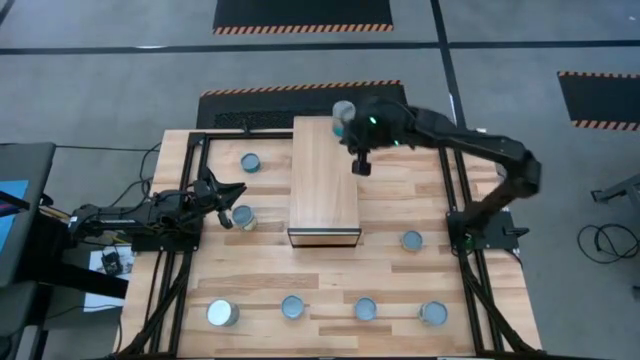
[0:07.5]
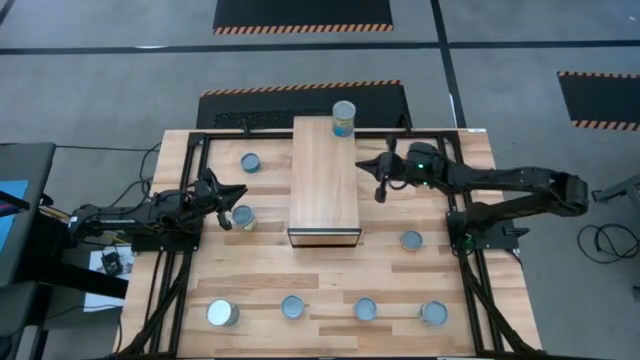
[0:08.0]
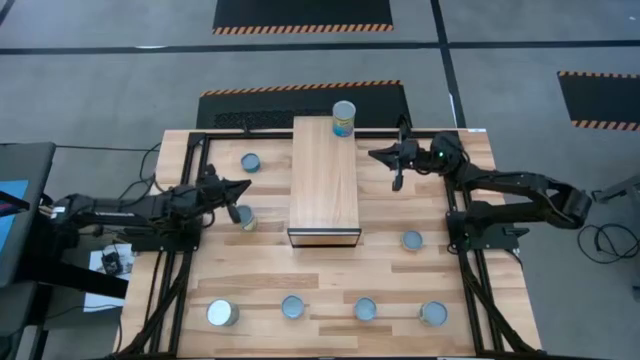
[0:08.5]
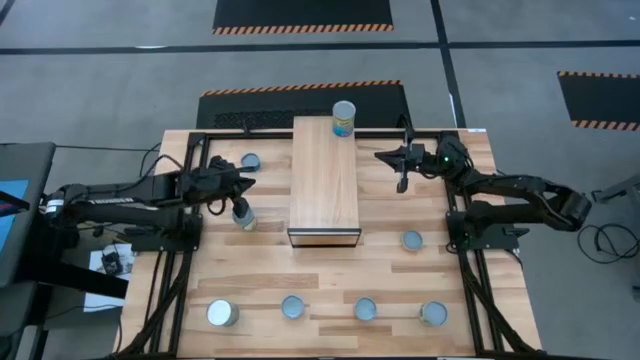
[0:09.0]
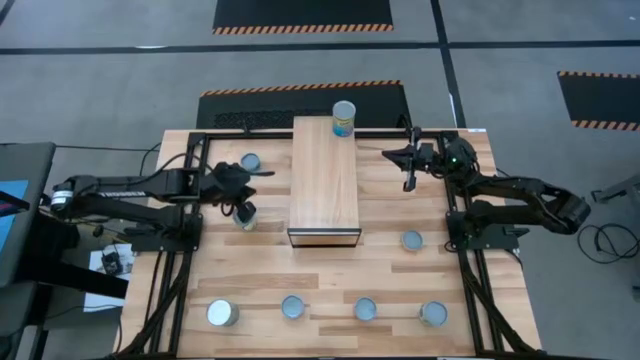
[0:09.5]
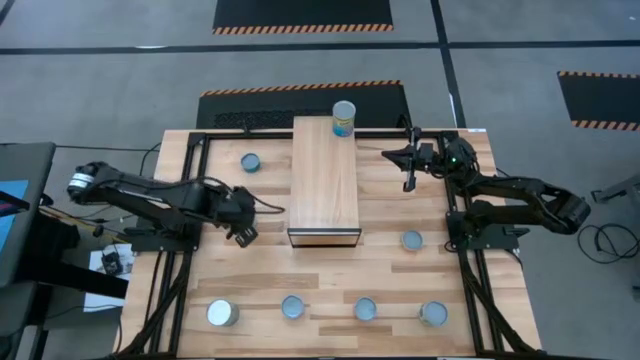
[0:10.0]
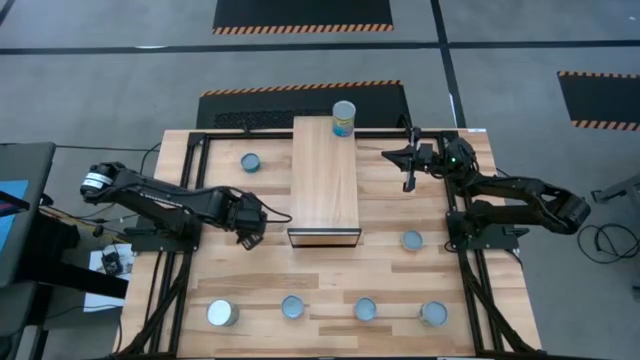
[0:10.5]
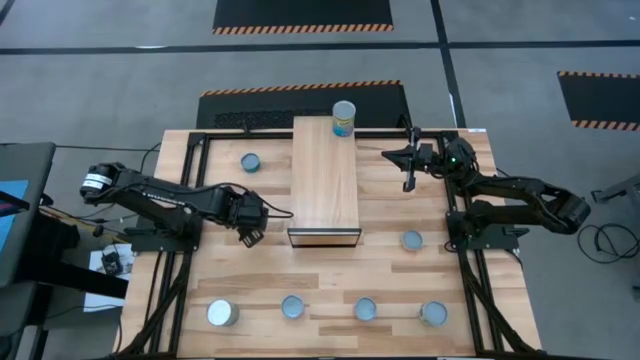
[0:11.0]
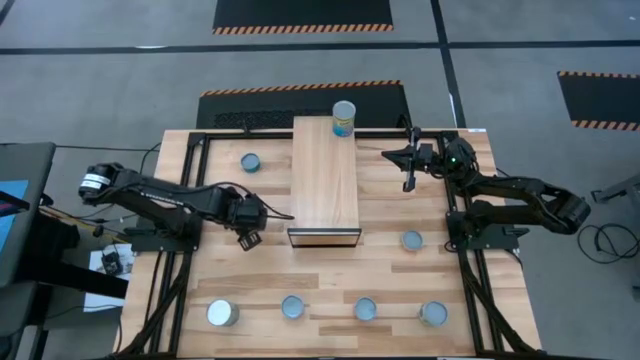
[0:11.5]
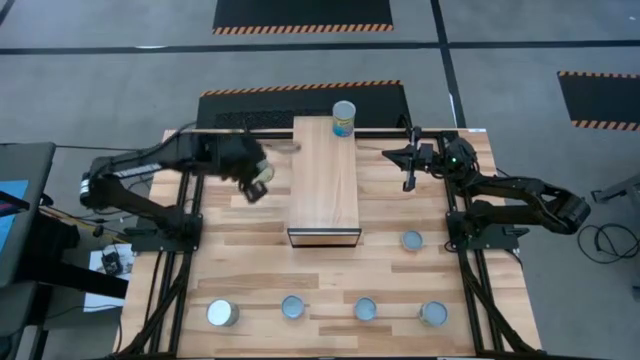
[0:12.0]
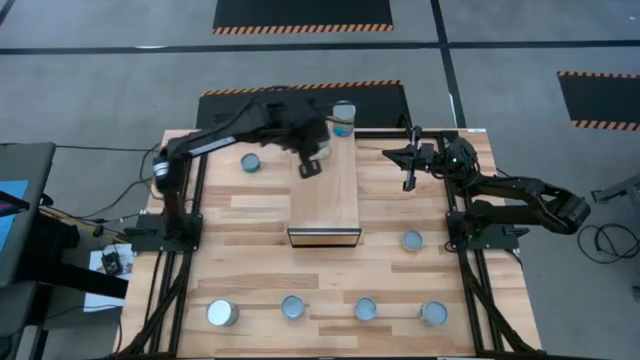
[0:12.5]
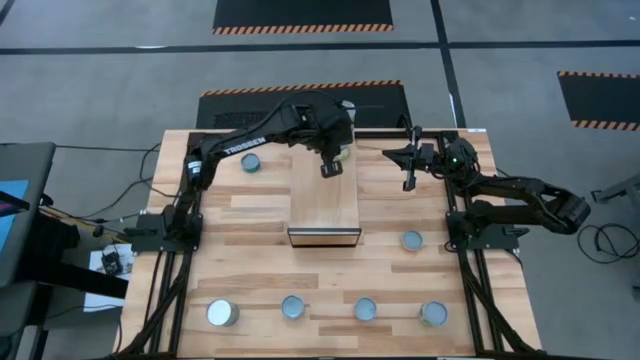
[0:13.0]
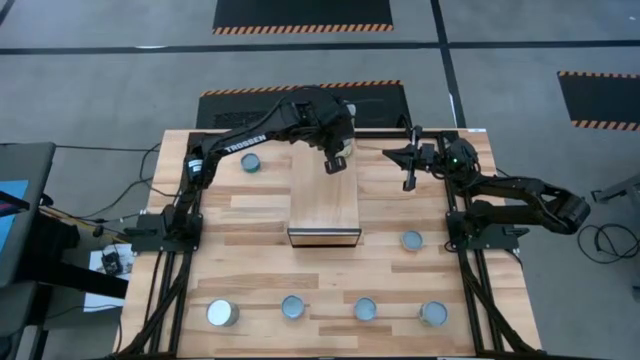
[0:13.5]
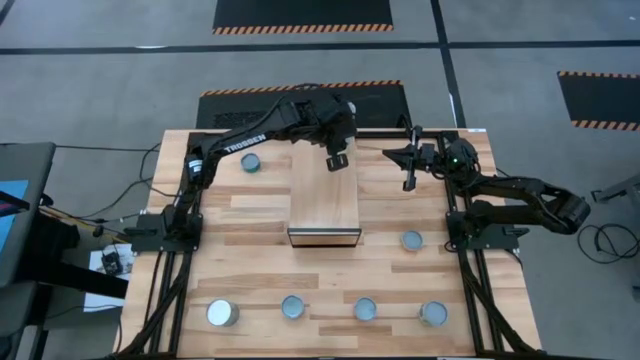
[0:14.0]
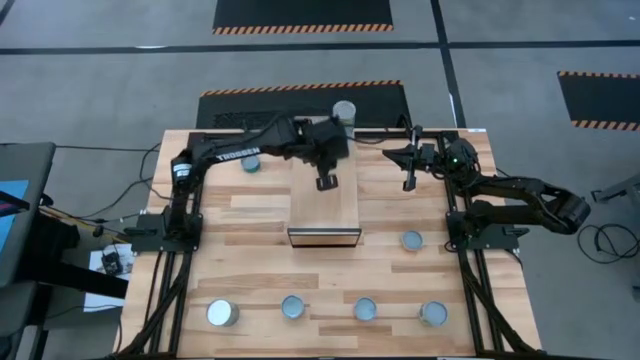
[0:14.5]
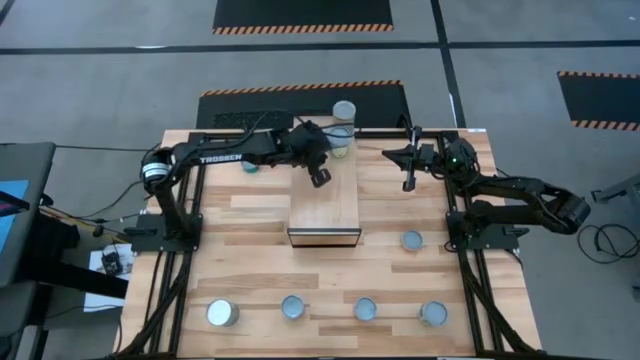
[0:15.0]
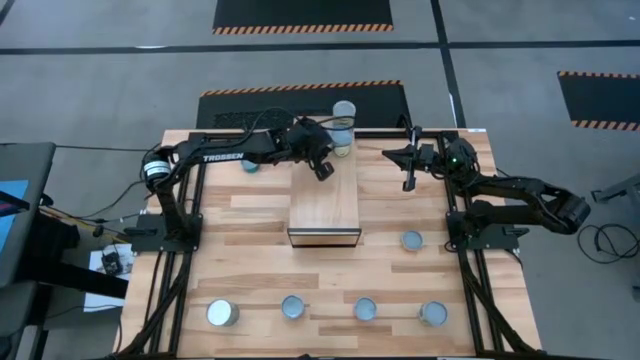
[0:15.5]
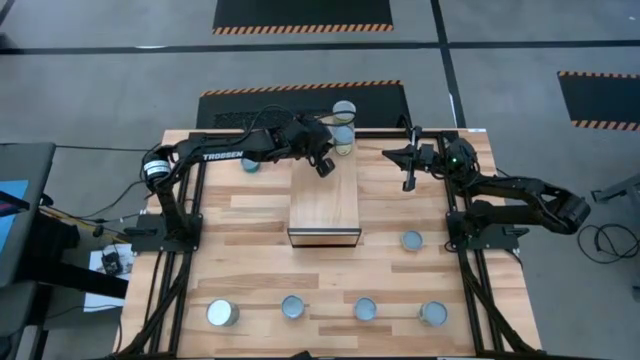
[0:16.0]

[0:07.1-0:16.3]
Task: Pick and place cans onto a shelf
Put the canned chicken soup on the shelf

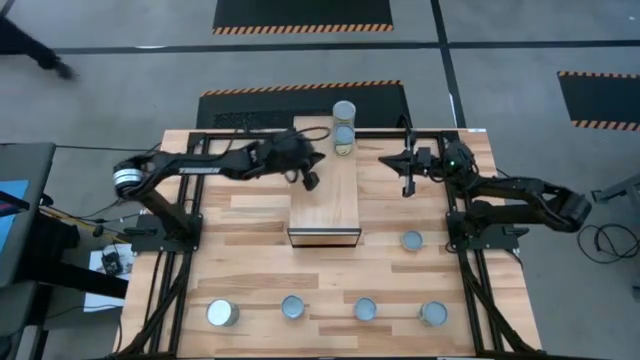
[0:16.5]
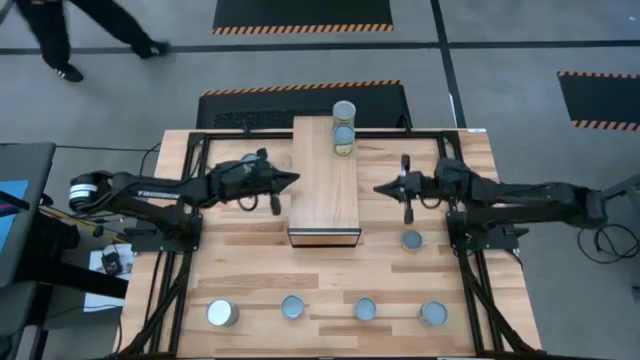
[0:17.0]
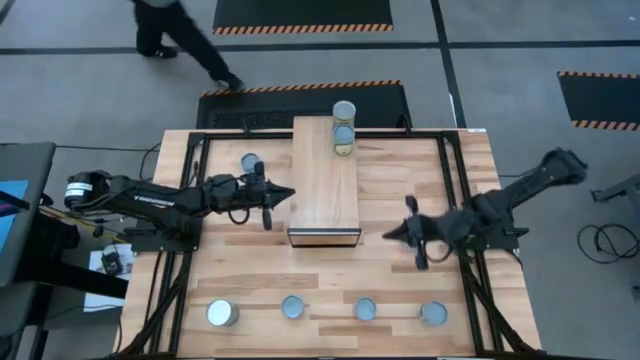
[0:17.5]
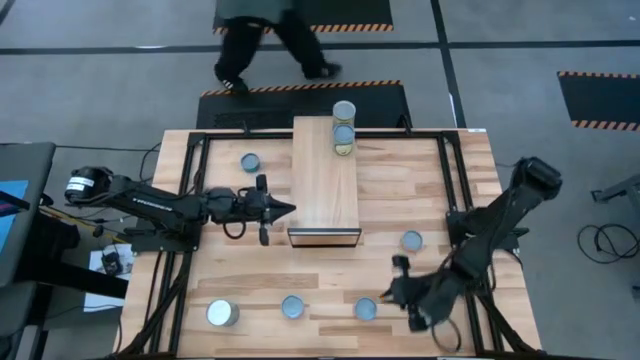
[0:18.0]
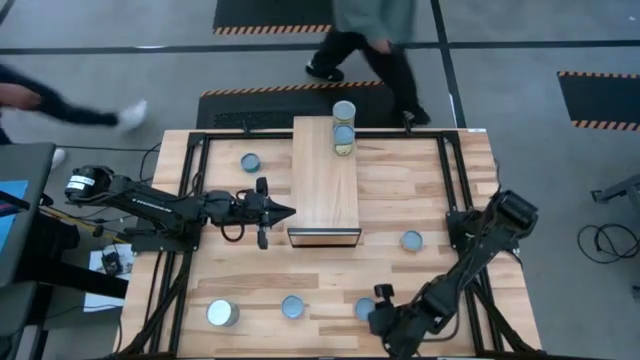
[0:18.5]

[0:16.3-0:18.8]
Put the canned tomato sauce on the shelf

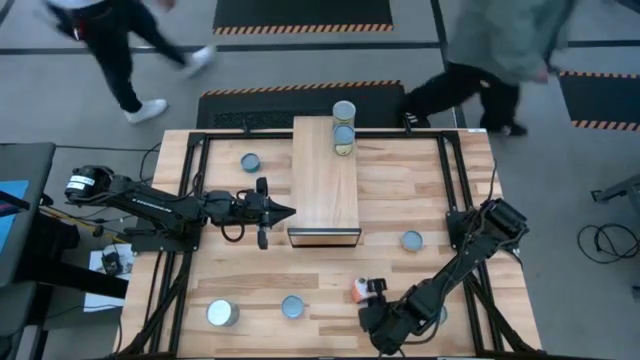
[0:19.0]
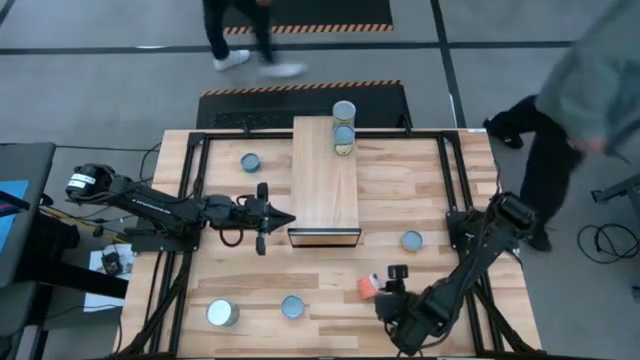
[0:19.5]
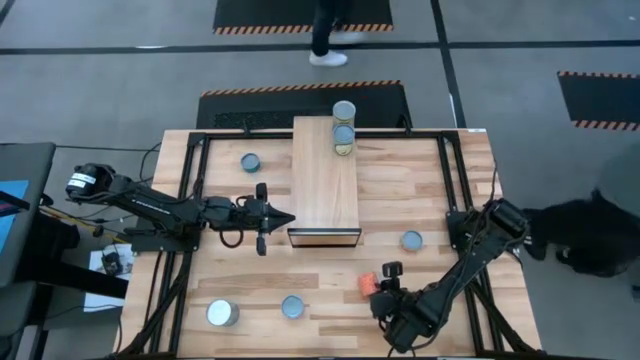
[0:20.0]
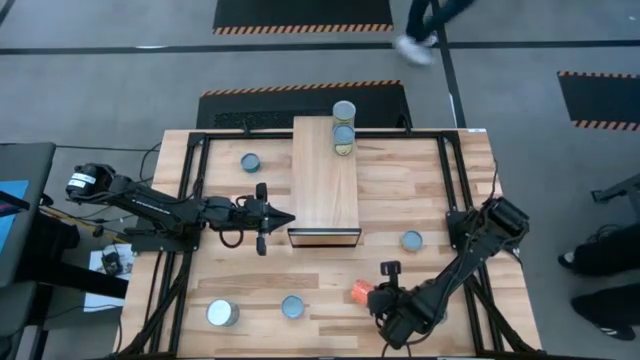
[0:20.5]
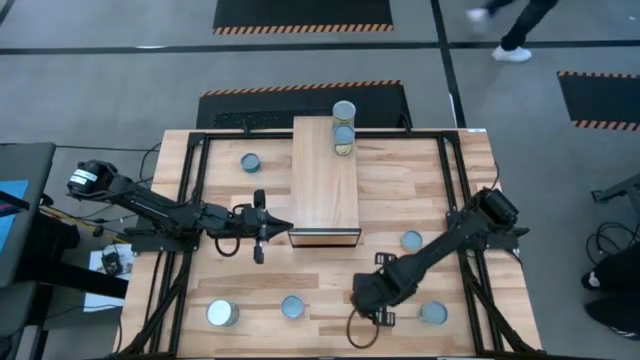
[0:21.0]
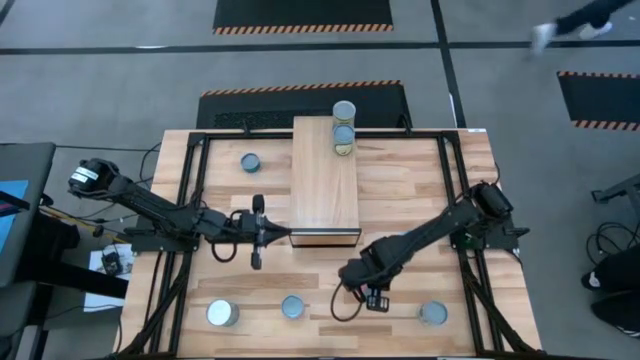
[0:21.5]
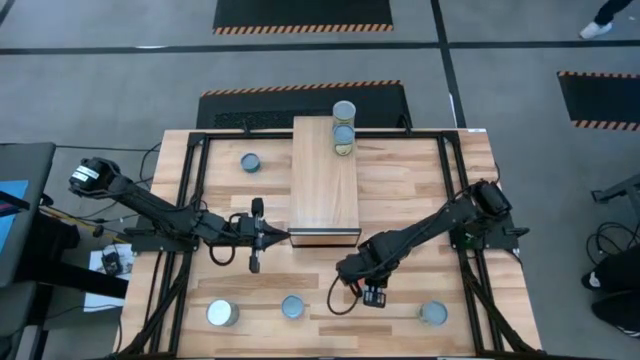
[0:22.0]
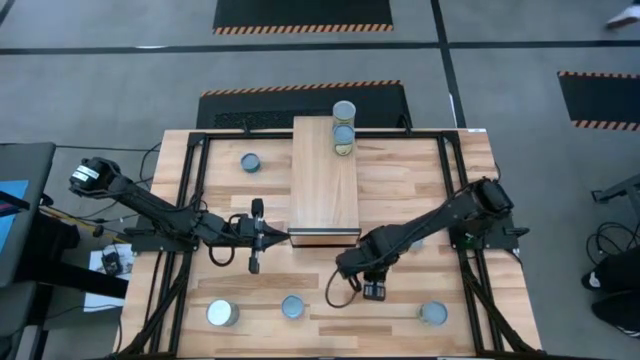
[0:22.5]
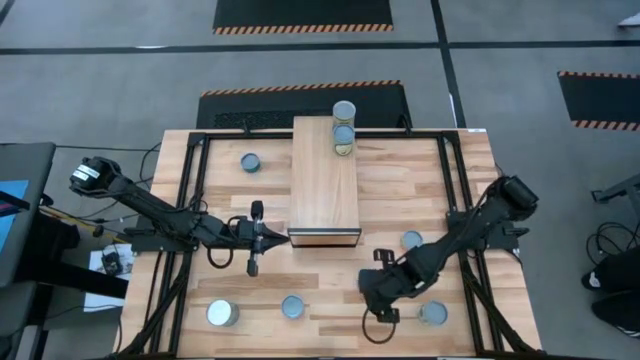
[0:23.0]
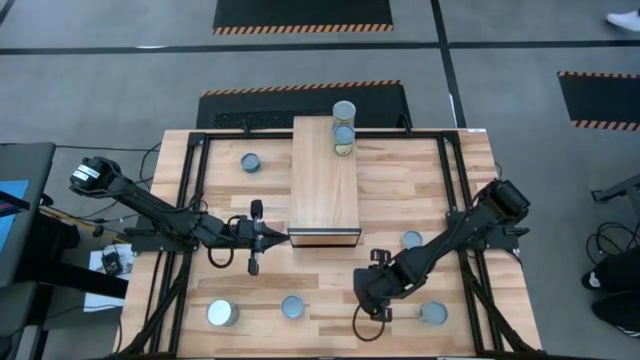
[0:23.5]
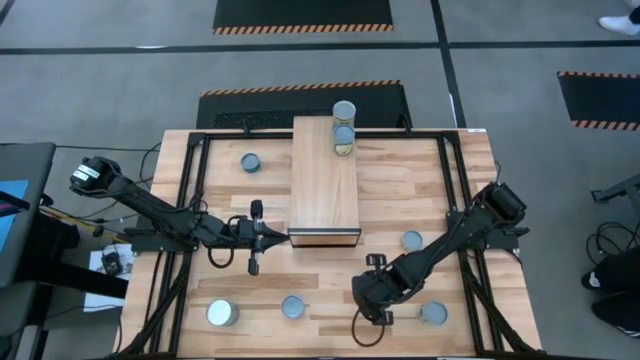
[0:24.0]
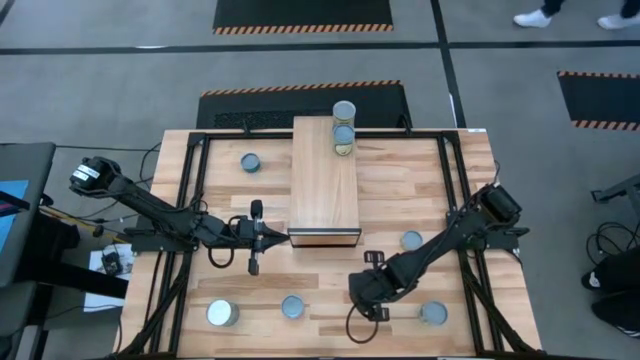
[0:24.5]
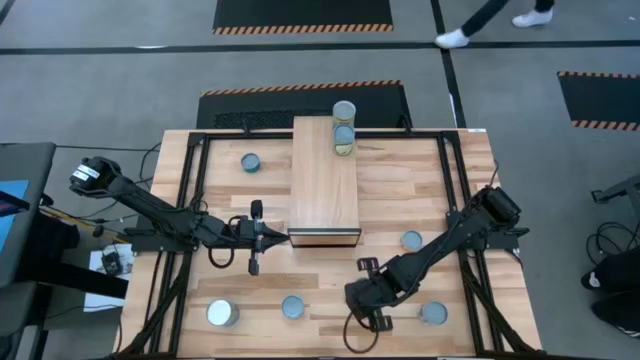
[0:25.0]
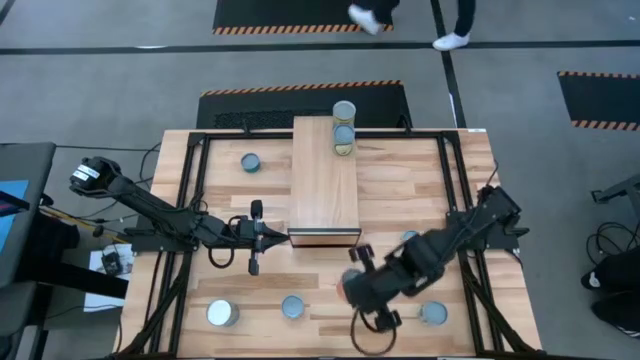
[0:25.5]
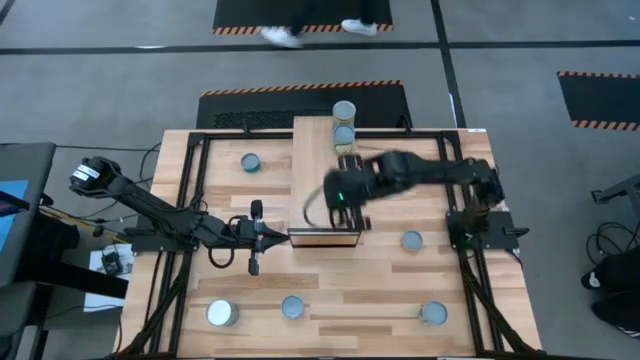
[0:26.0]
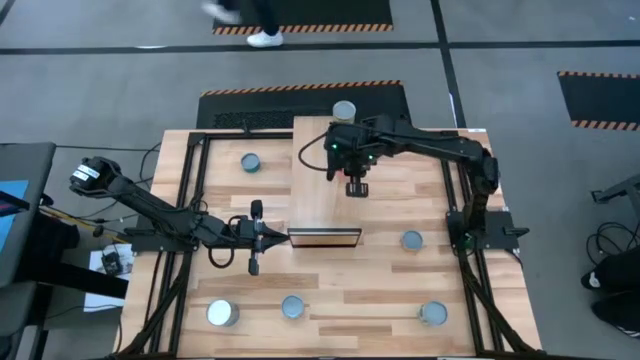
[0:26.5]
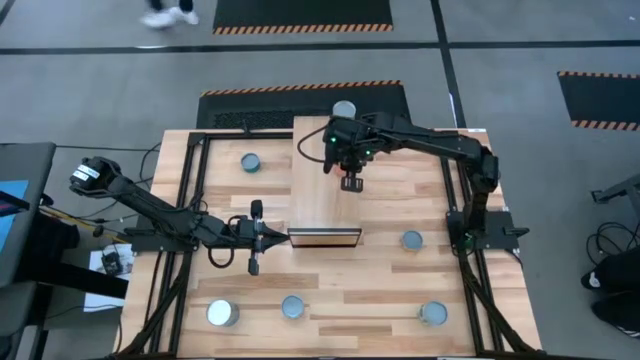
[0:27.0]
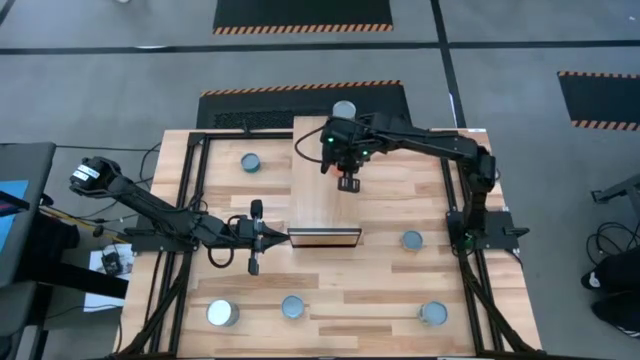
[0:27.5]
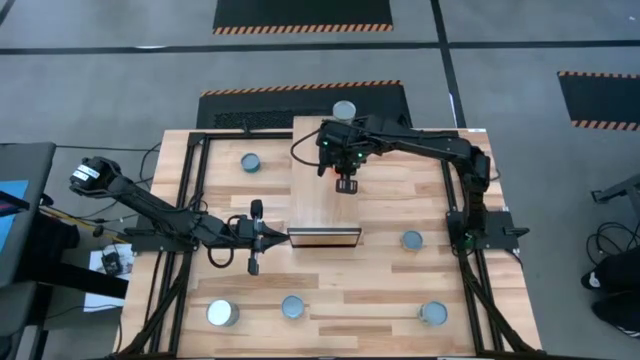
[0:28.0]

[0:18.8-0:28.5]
Put the canned tomato sauce on the shelf

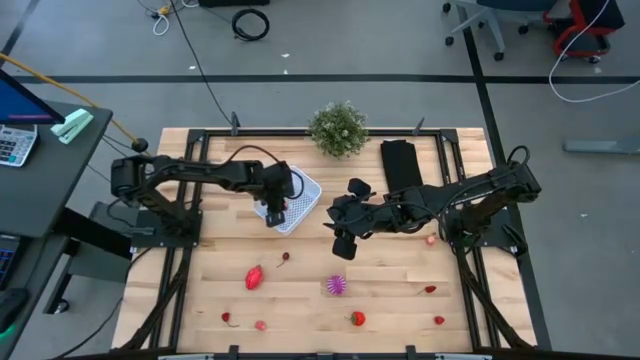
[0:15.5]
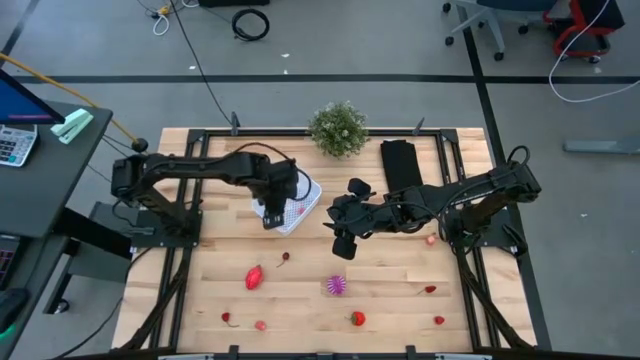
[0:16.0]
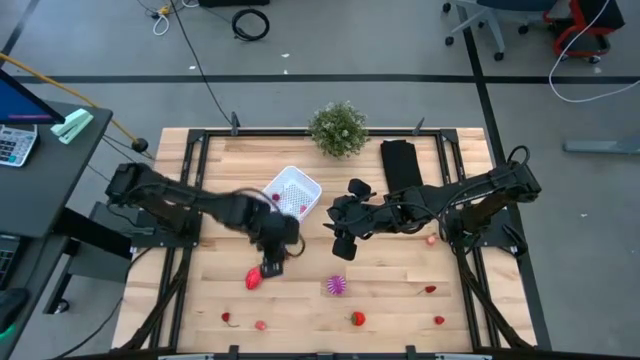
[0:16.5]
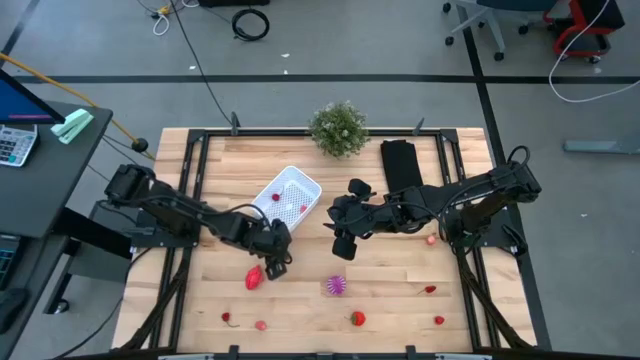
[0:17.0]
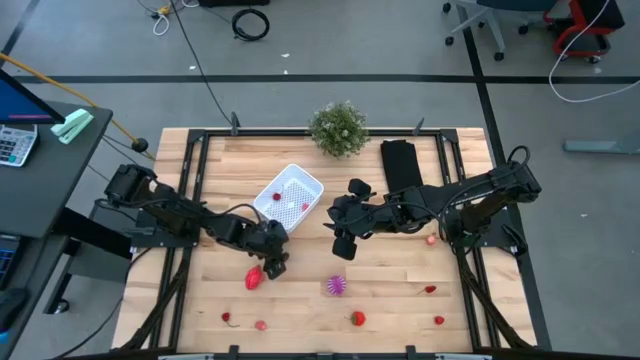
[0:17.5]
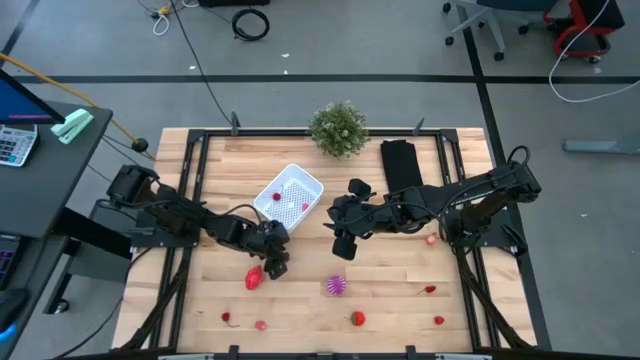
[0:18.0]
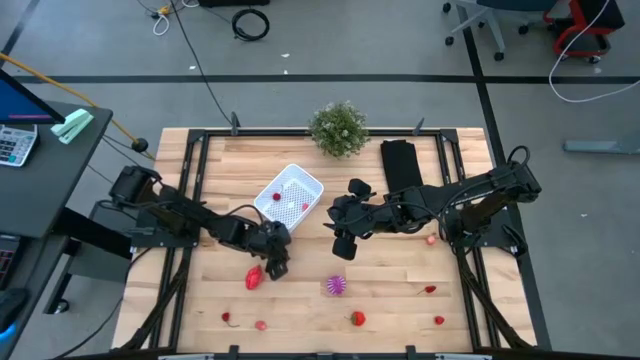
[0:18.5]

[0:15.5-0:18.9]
Task: Pick and placing Produce into tupperware
Put the red cherry into the white basket
